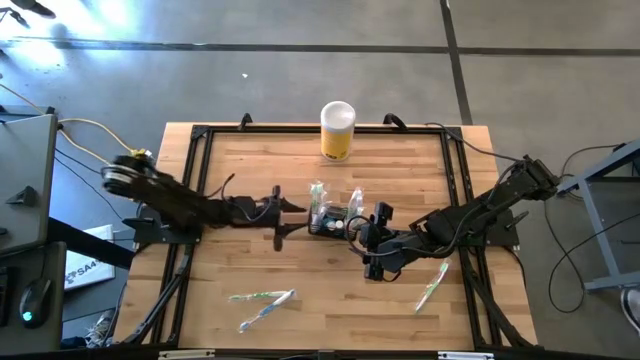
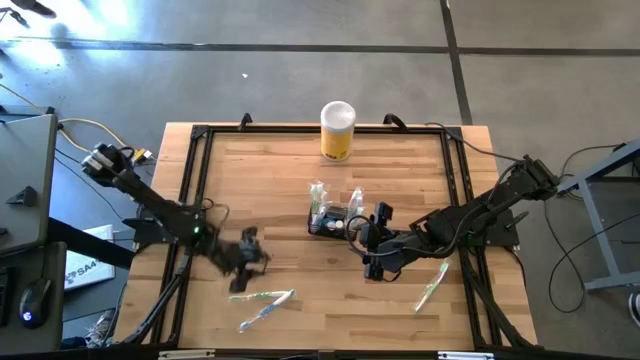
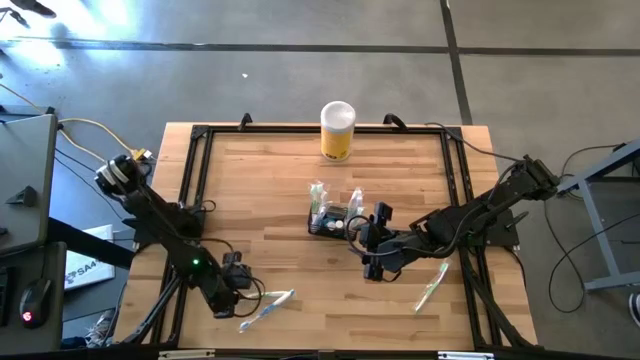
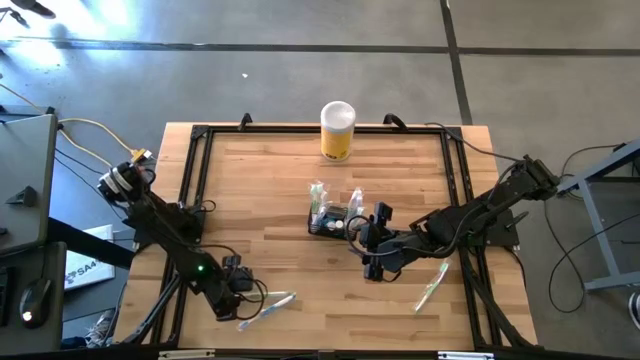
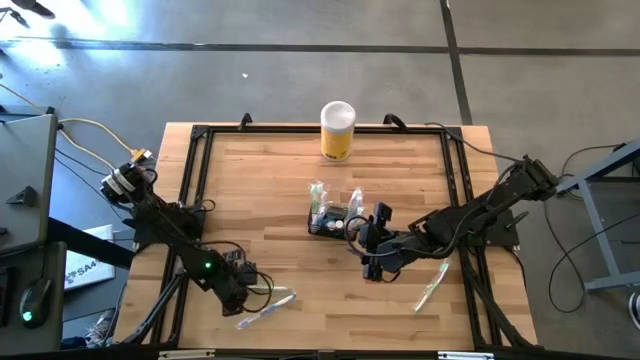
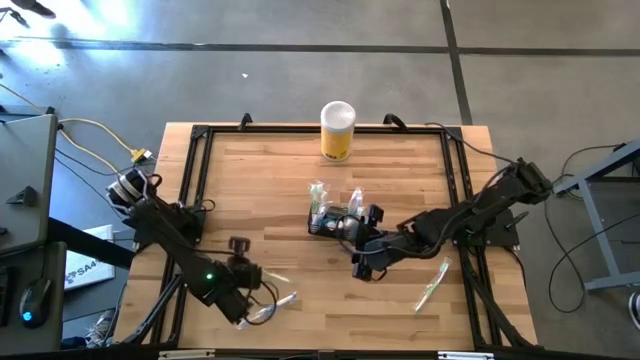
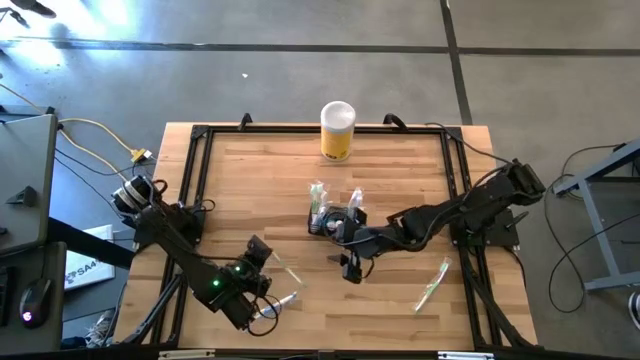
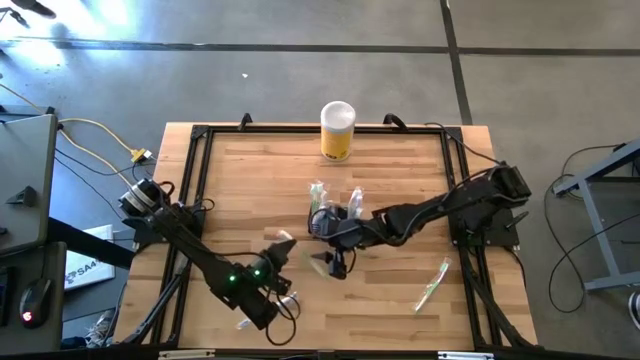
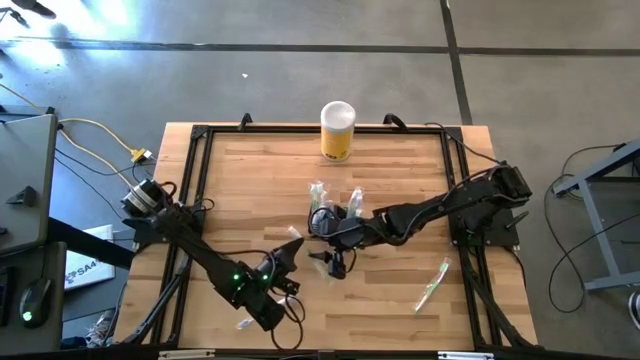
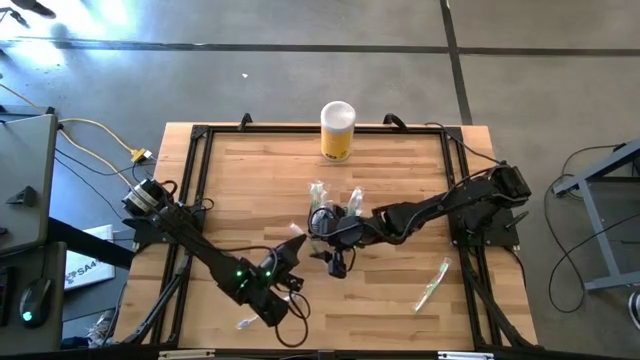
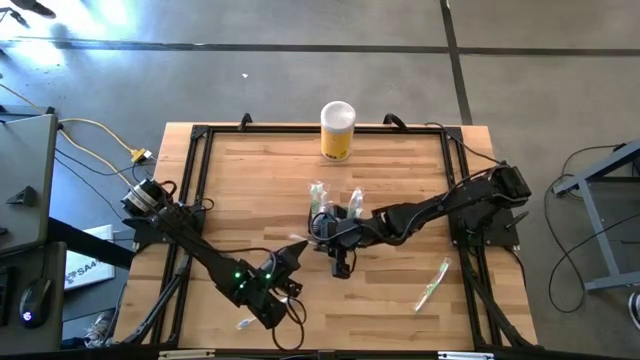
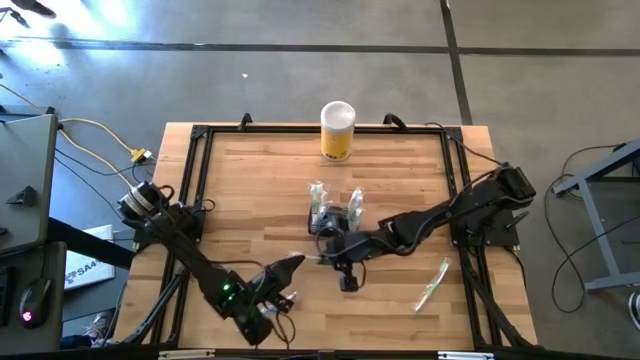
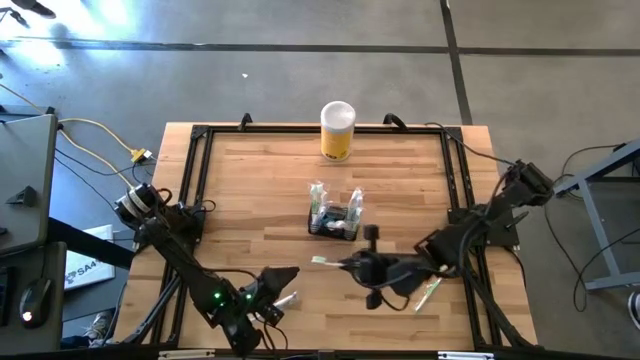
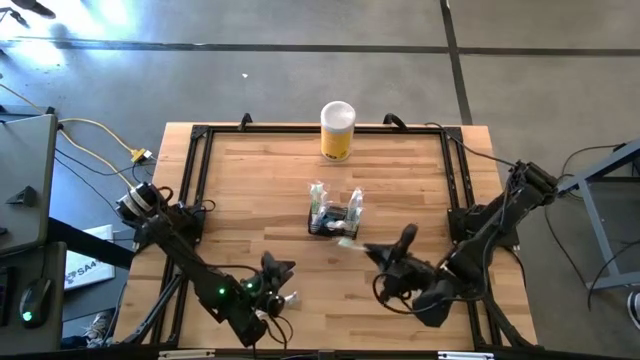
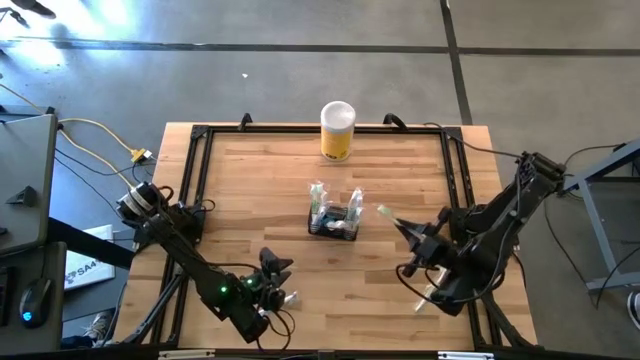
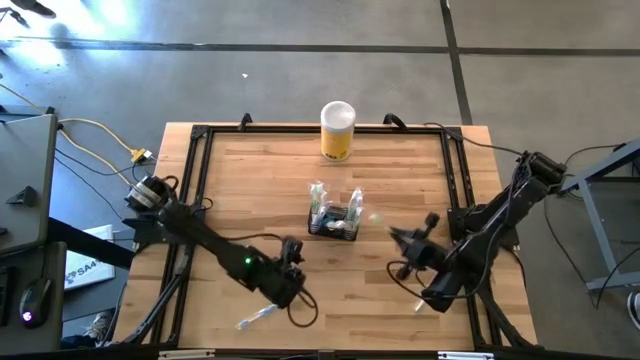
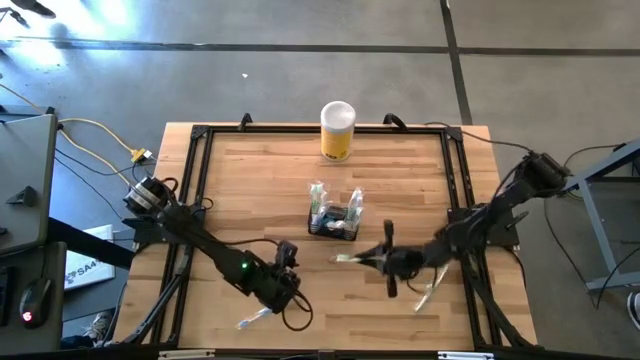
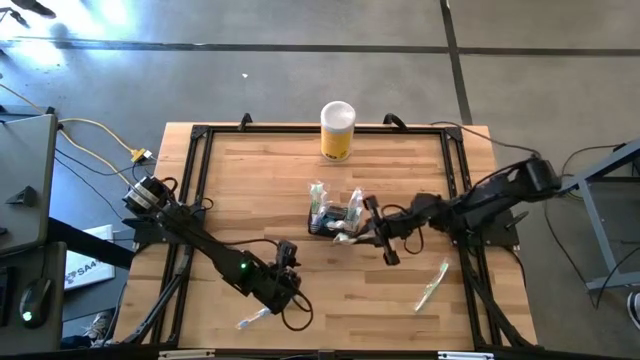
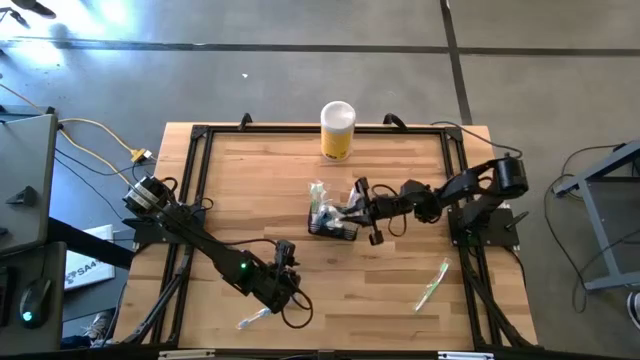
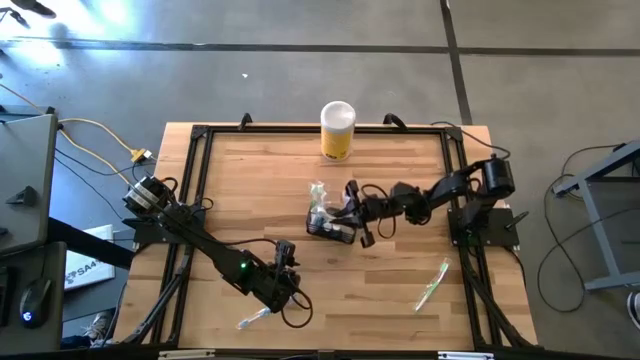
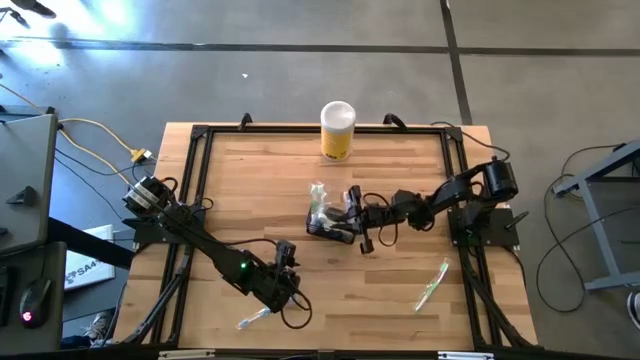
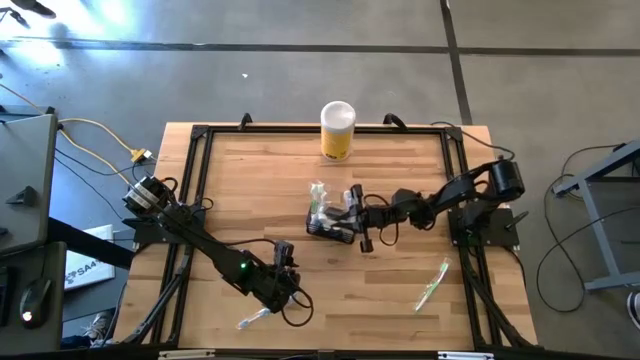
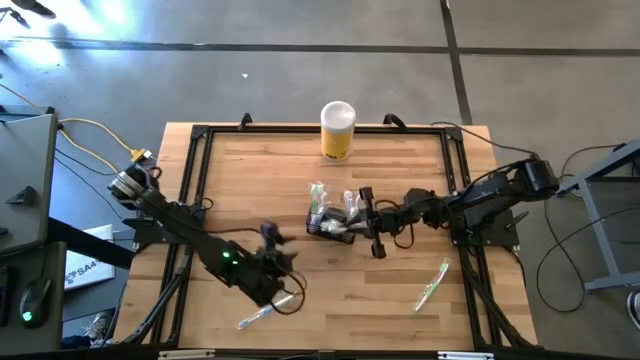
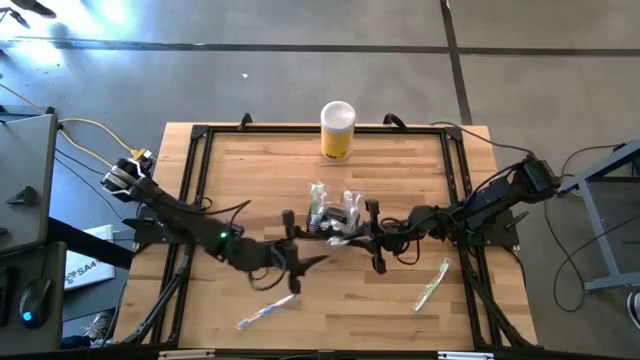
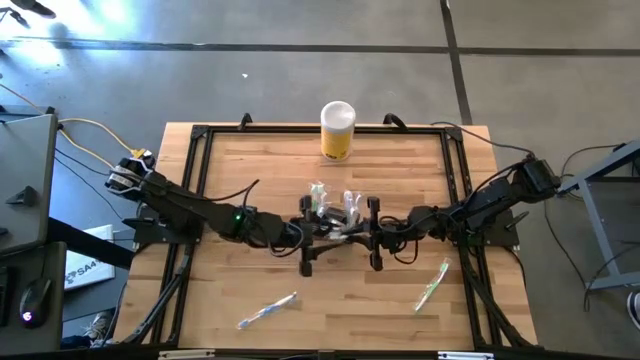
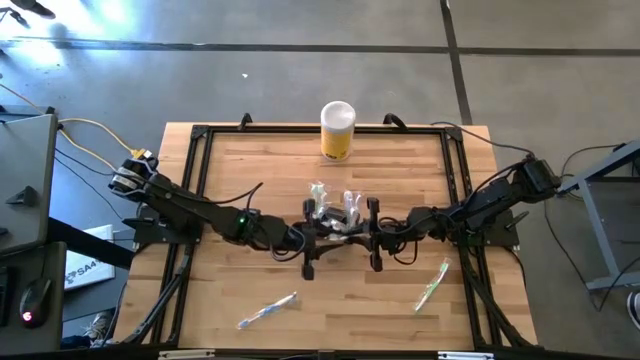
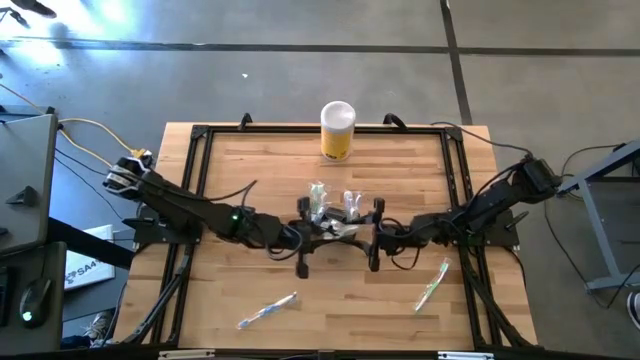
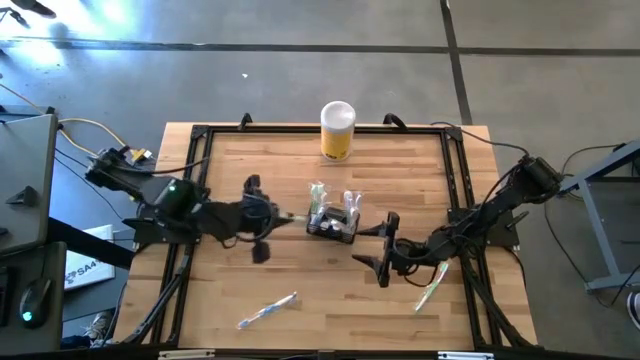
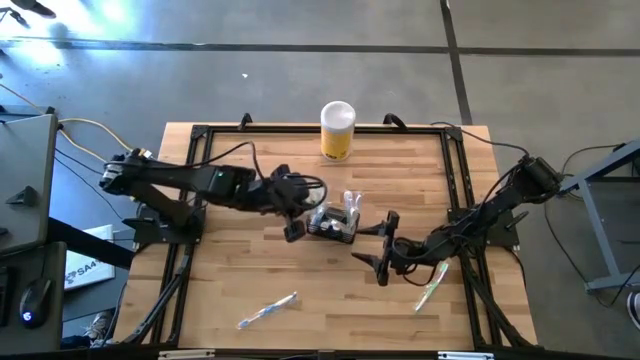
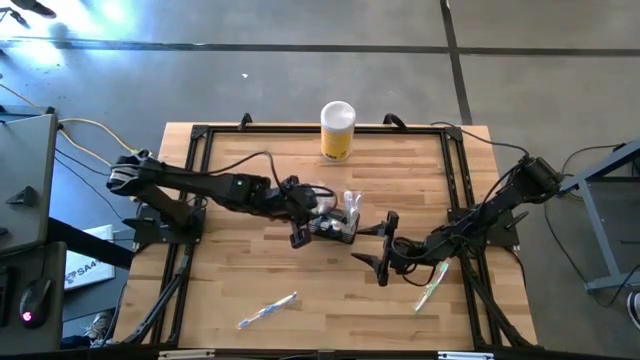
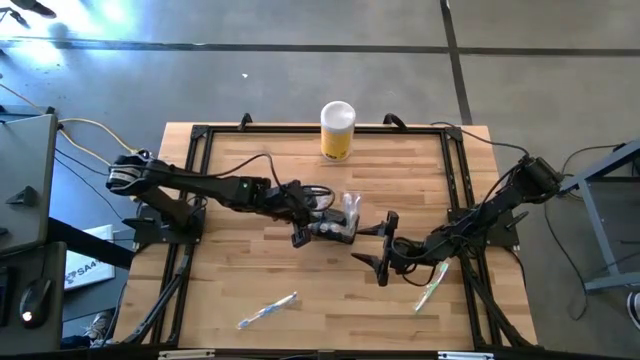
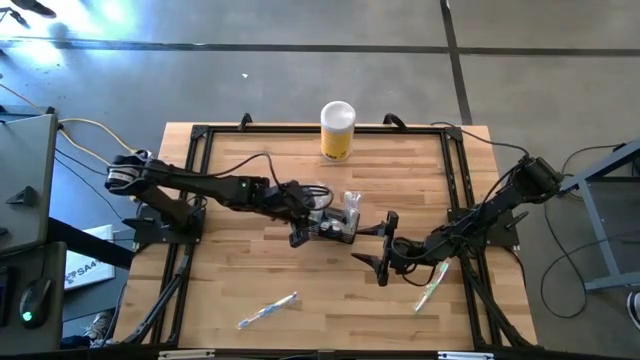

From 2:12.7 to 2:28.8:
Task: Pick & Place toothbrushing station
Put the green toothbrush into the wire organizer

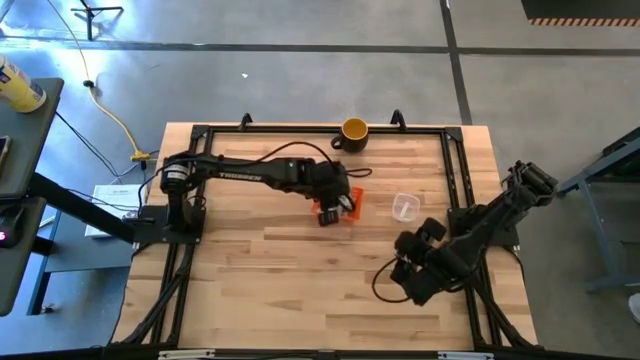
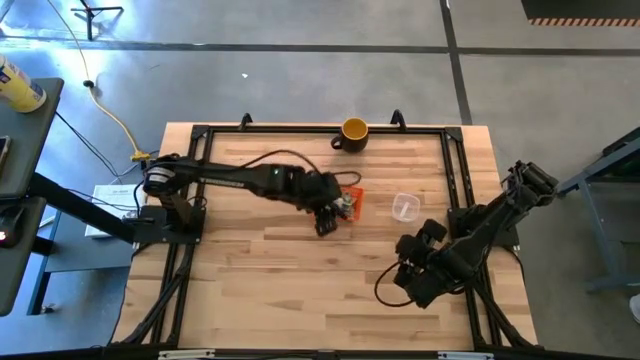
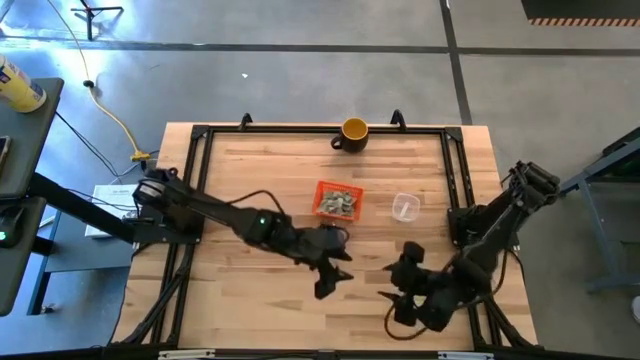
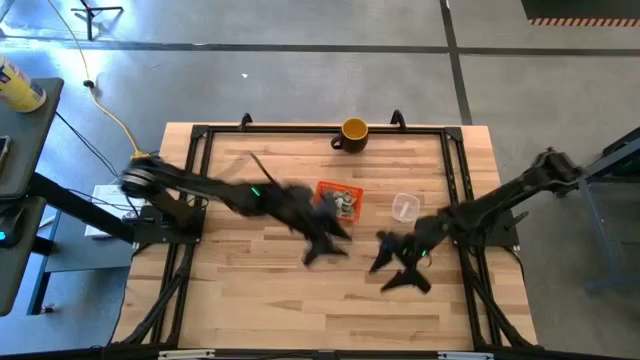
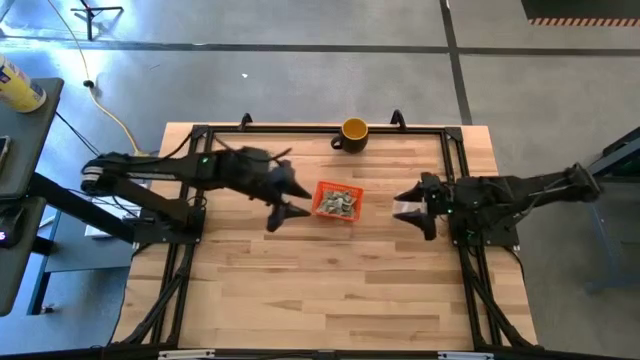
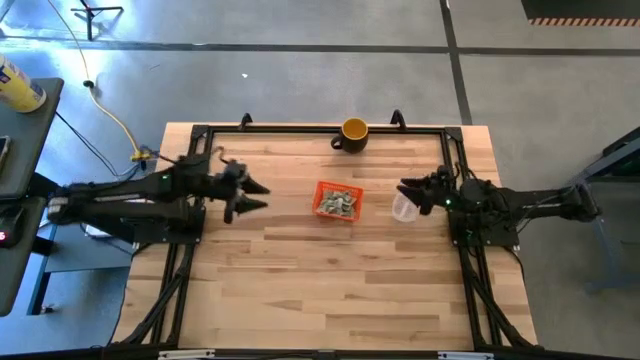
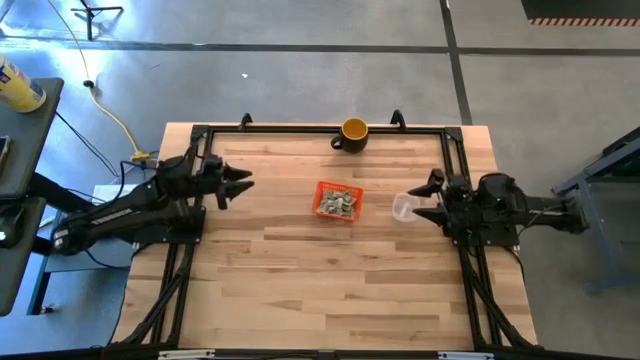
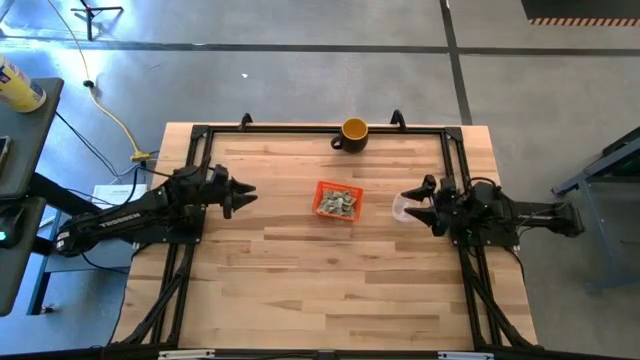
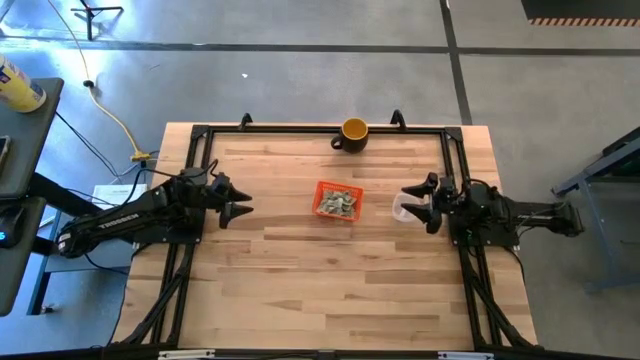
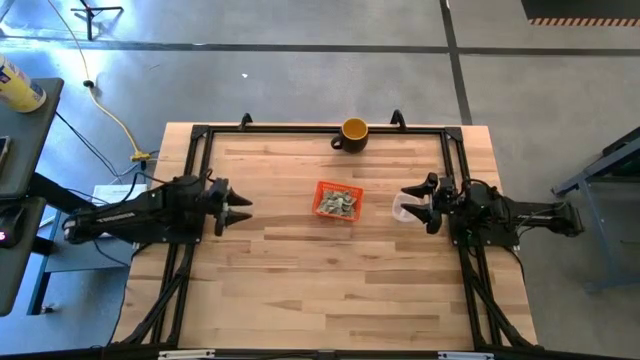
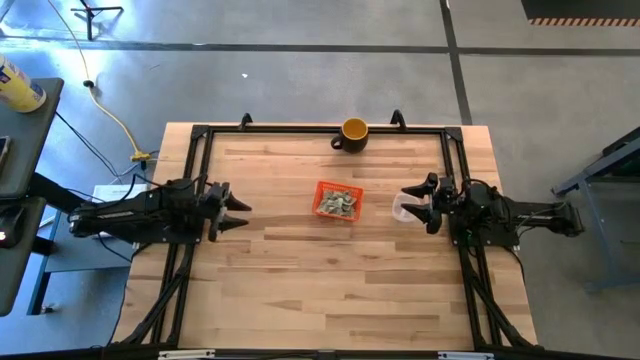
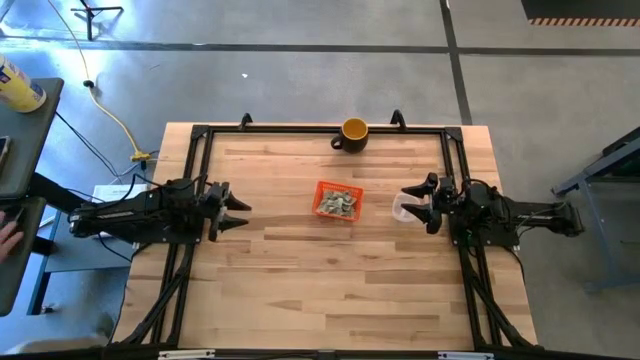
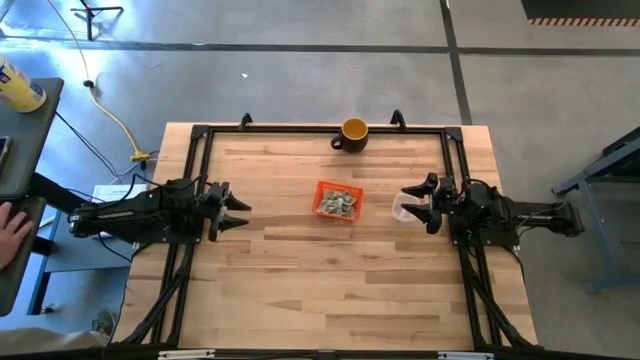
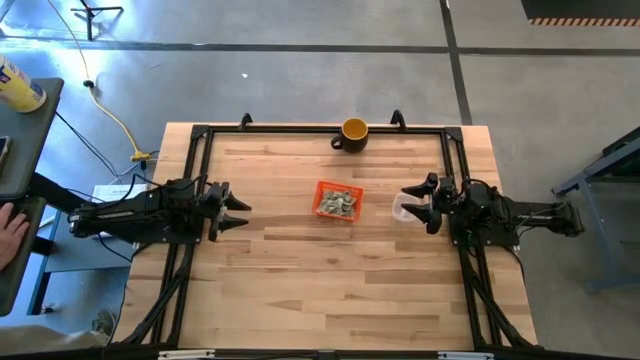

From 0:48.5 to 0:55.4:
Task: Pick and place items into bin
Return to Home Position
